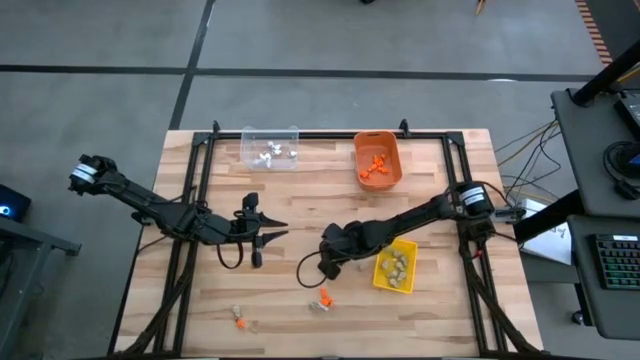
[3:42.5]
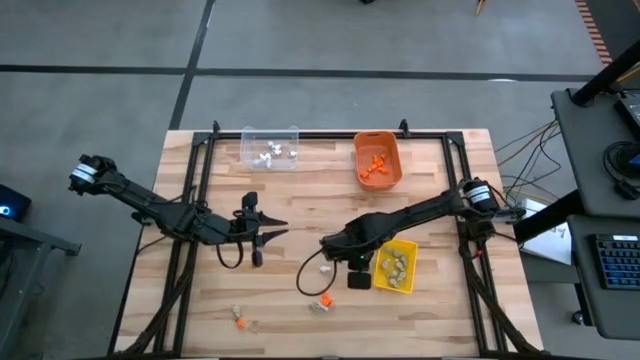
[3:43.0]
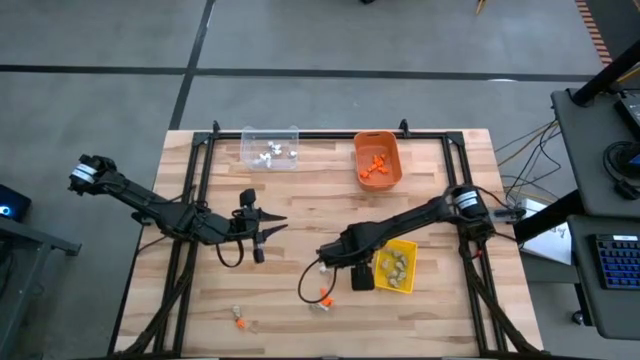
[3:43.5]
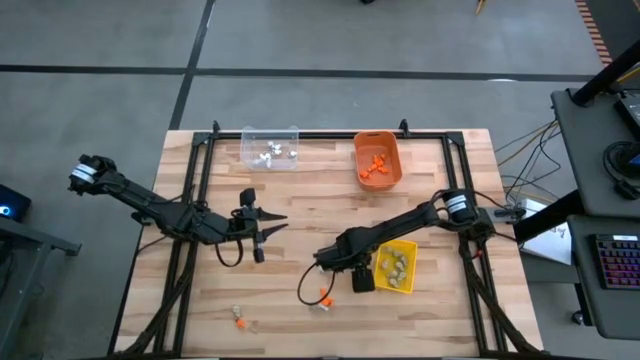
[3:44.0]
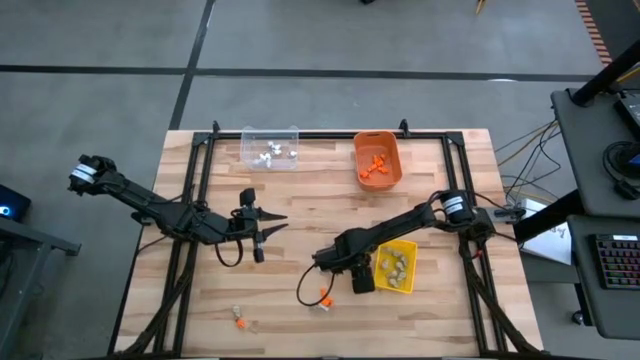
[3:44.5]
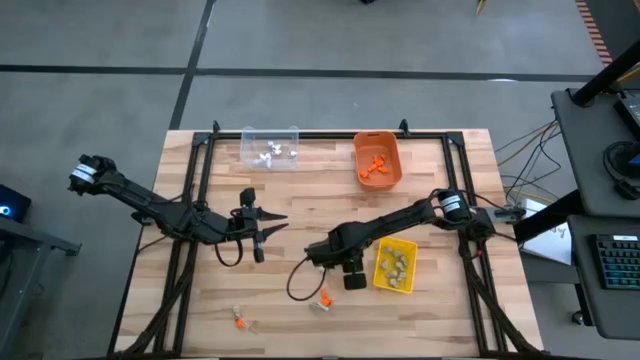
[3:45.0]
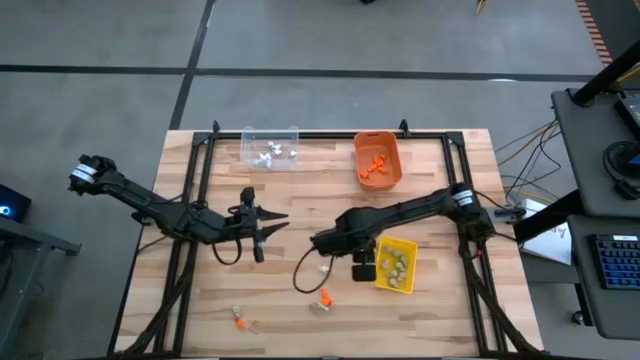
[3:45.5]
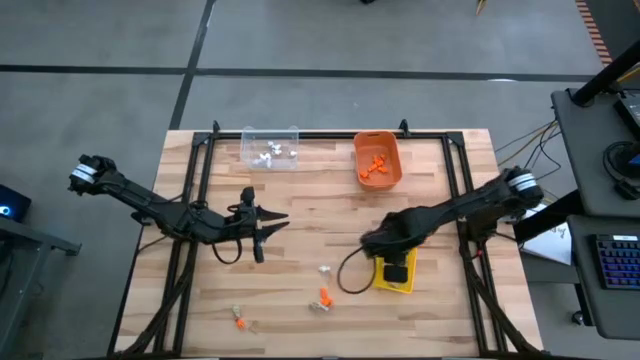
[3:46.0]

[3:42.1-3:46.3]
Task: Sort Halloween decoration
Put the gray skull toy into the yellow bin

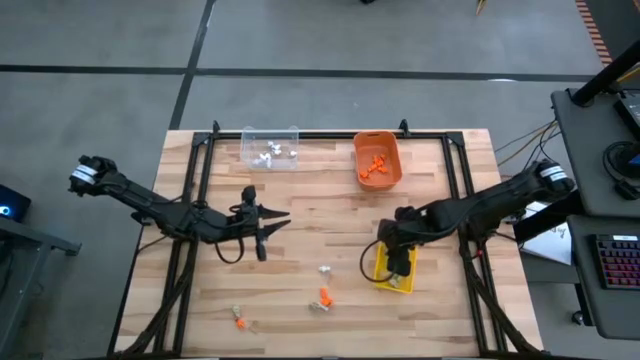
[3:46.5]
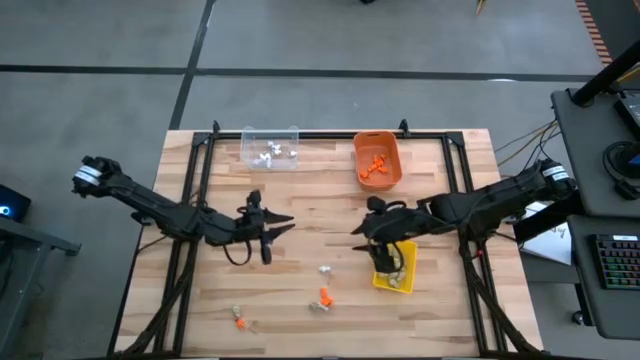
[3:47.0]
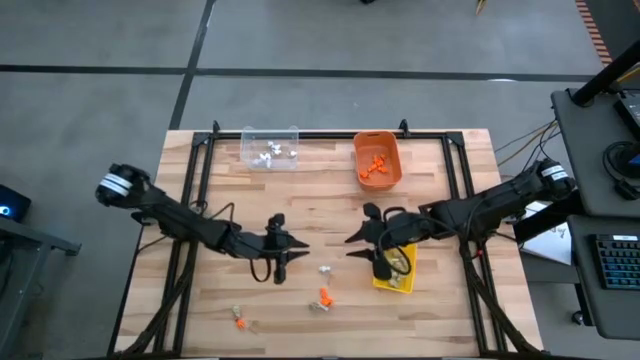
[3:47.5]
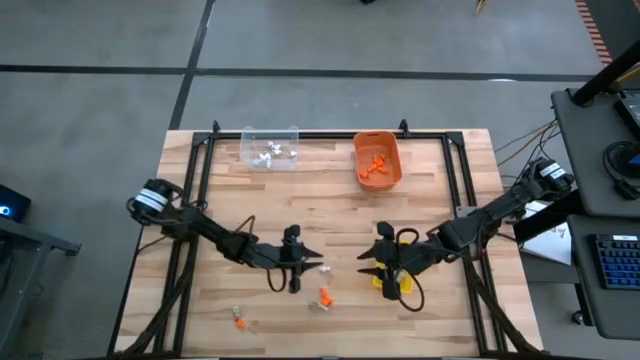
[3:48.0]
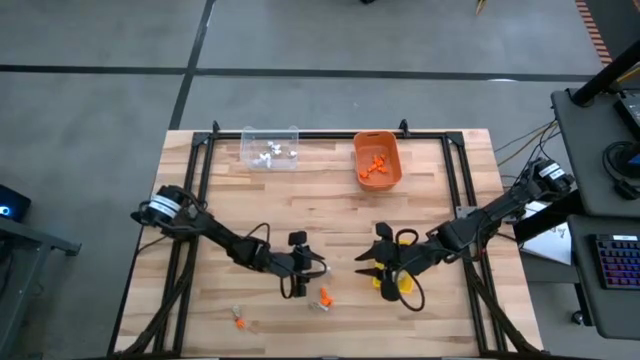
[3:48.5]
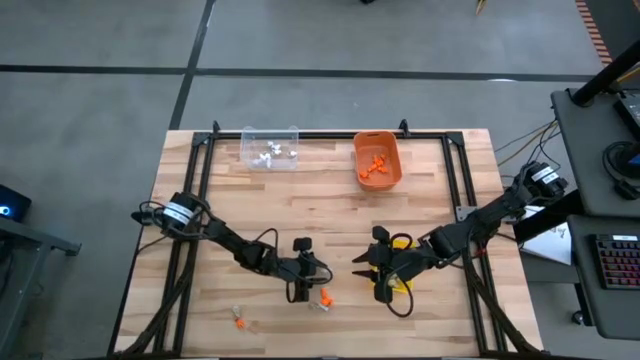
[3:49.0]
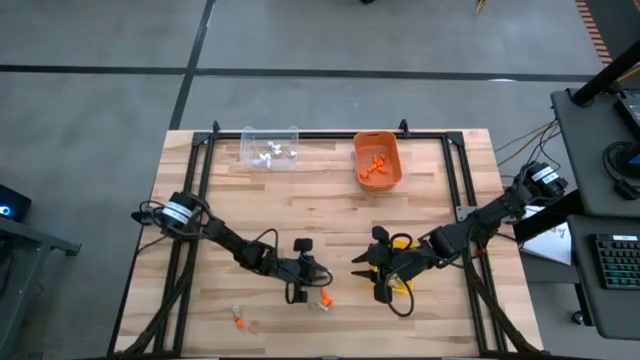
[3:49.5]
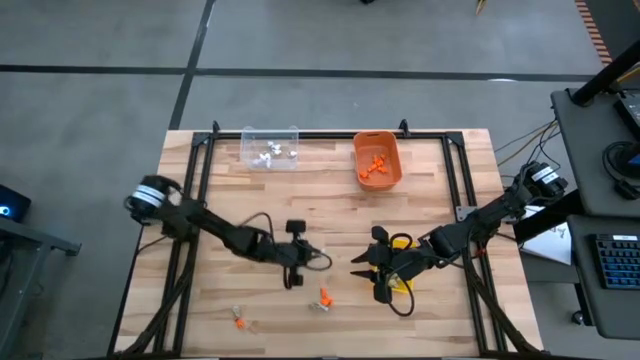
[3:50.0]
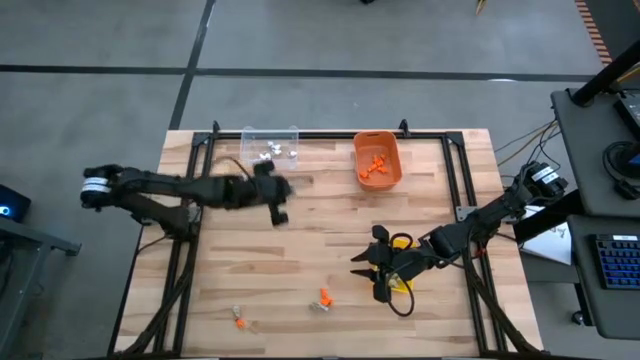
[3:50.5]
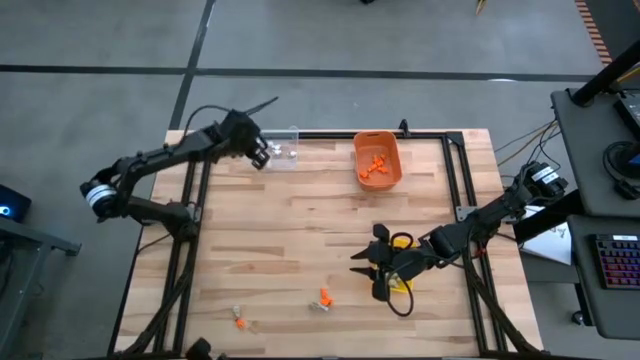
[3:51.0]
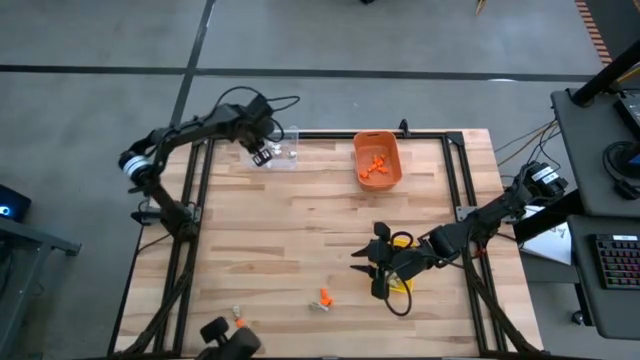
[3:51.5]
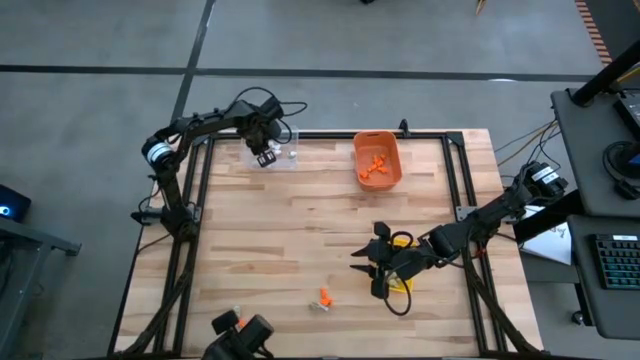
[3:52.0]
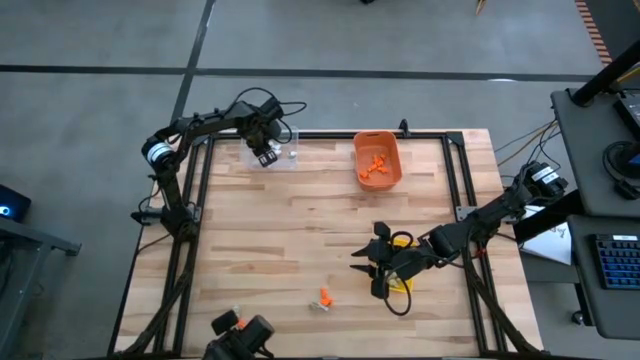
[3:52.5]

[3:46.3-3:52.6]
Put the white skeleton toy into the transparent bin

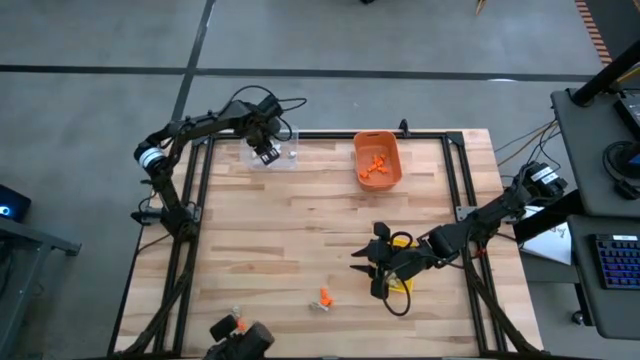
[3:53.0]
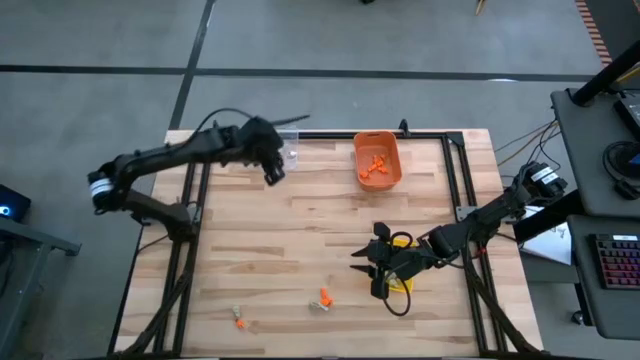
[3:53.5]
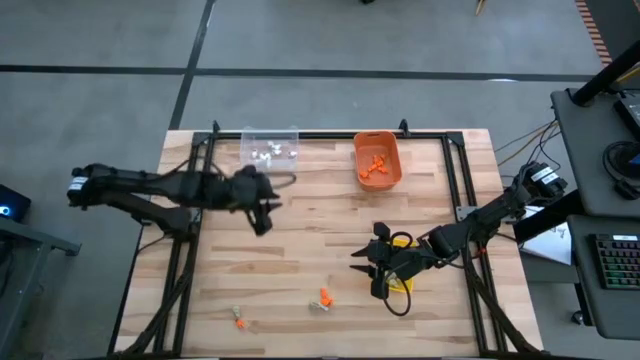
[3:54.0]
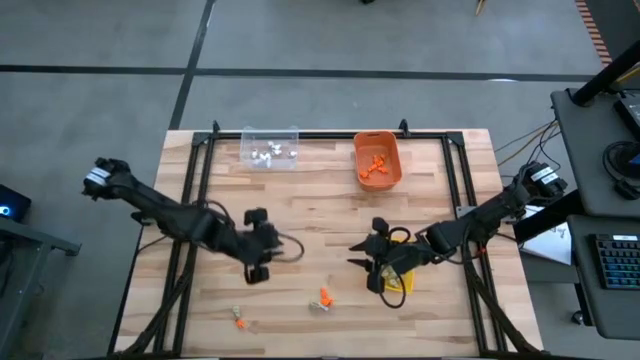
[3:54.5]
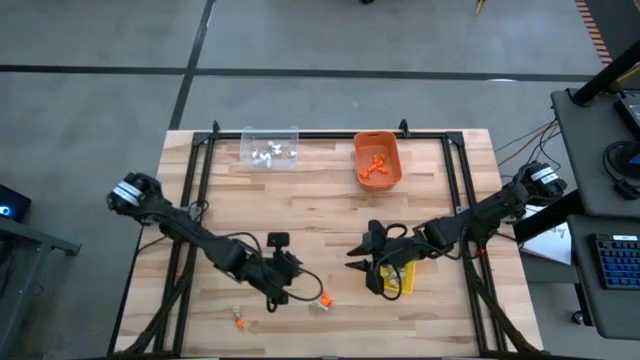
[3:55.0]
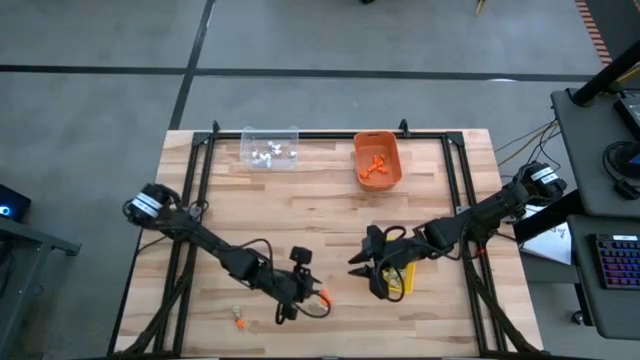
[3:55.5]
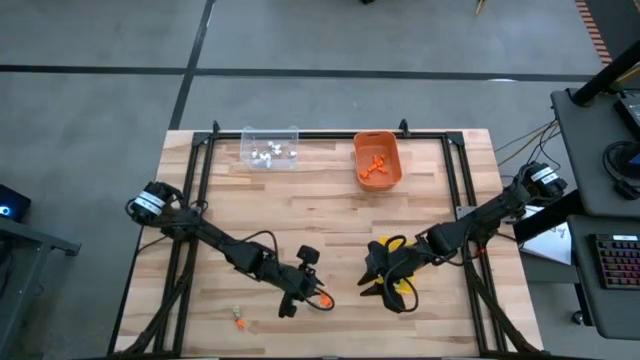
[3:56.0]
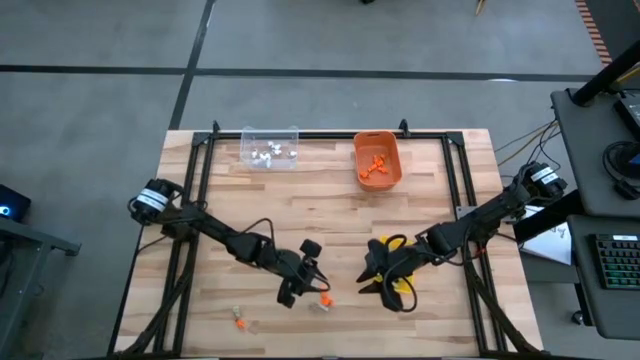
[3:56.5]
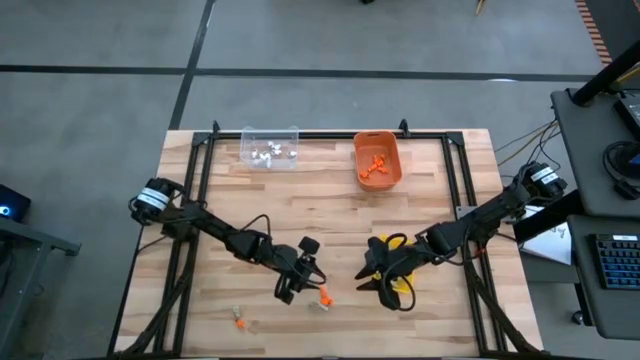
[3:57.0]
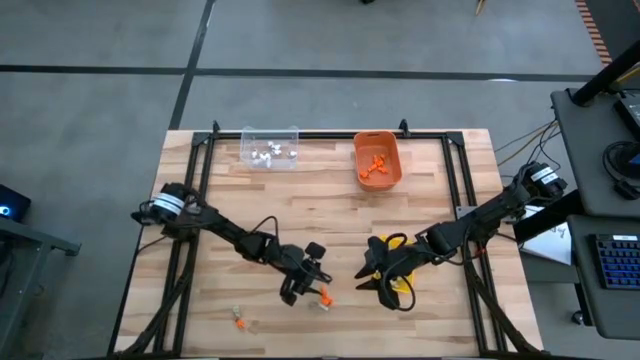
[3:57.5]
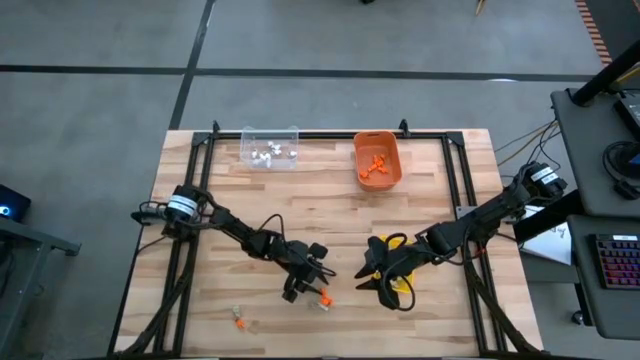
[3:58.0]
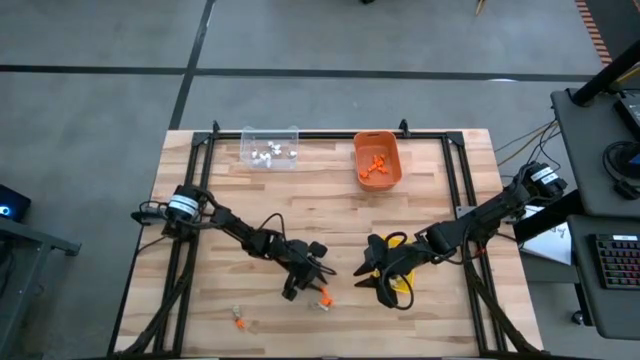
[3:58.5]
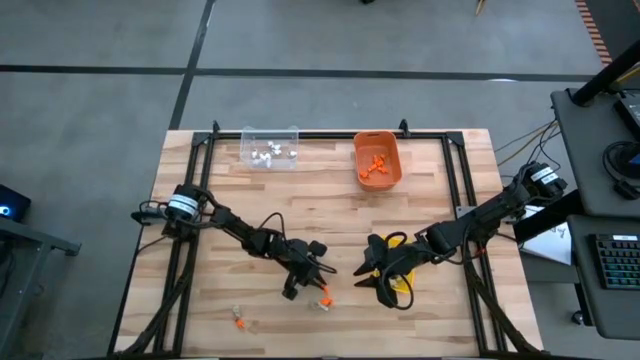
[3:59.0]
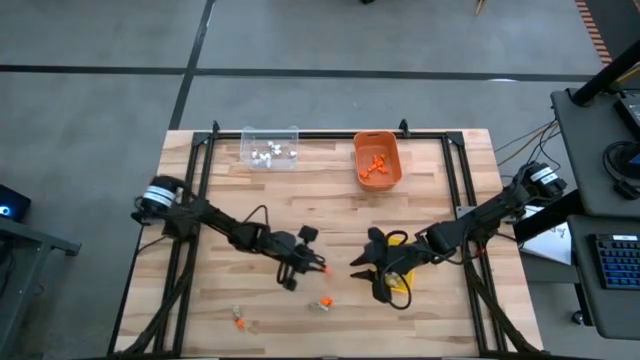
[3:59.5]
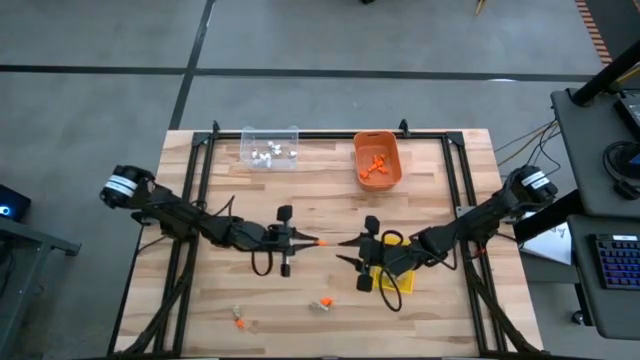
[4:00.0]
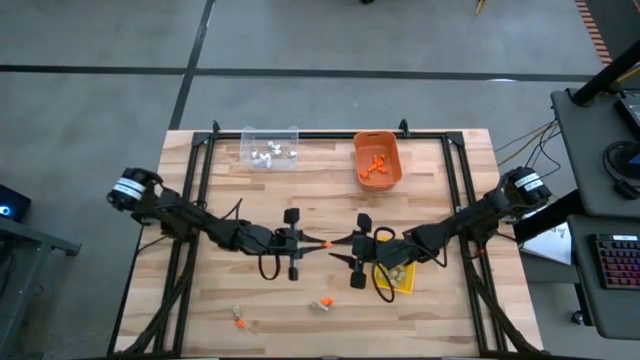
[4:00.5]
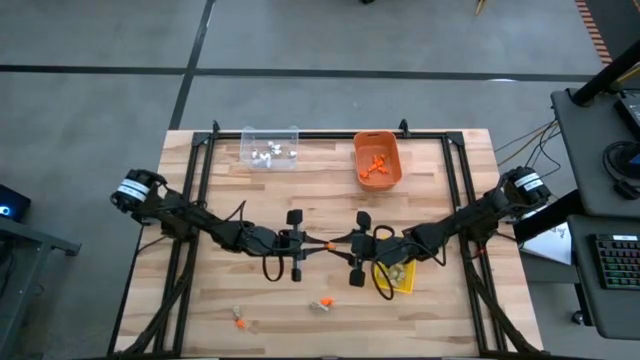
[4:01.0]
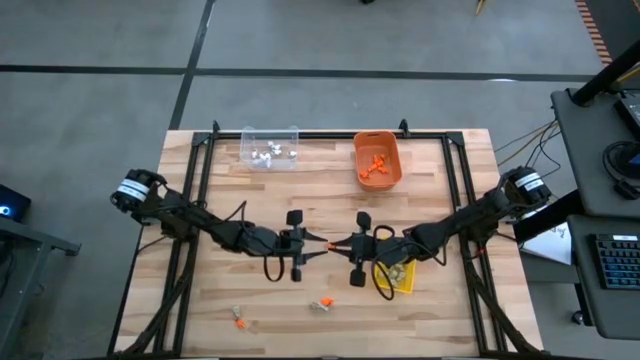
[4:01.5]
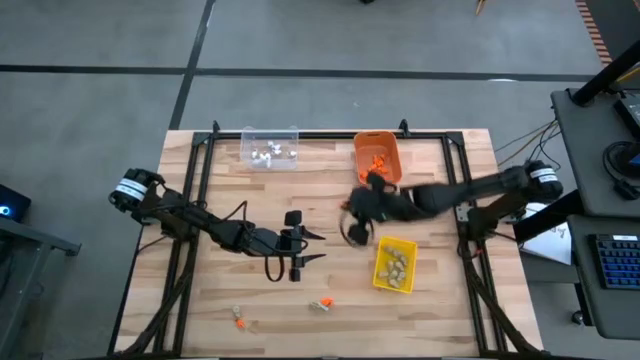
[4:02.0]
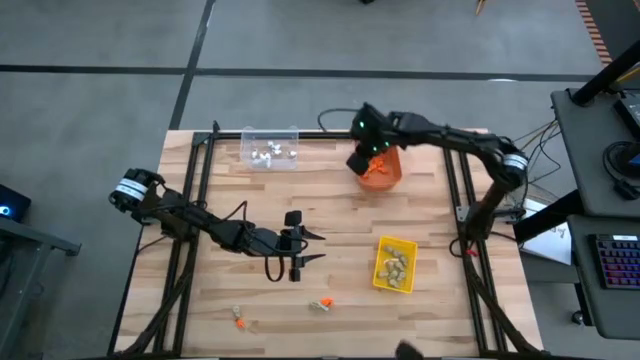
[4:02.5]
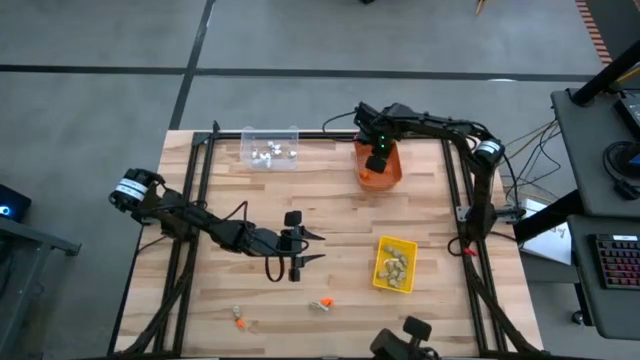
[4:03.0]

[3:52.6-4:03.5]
Put the orange skeleton toy into the yellow bin
